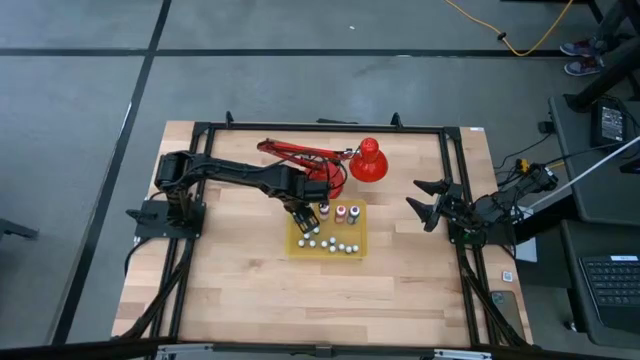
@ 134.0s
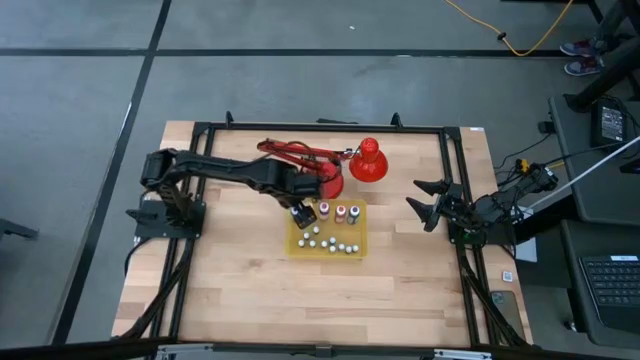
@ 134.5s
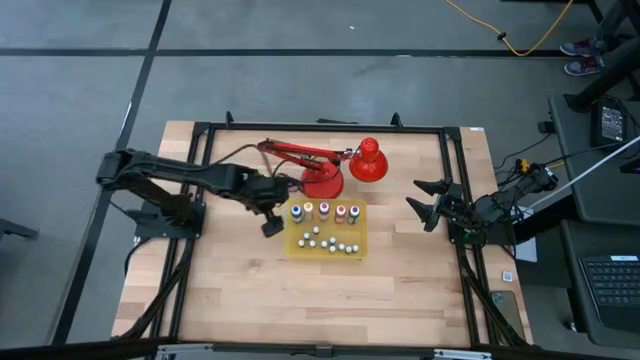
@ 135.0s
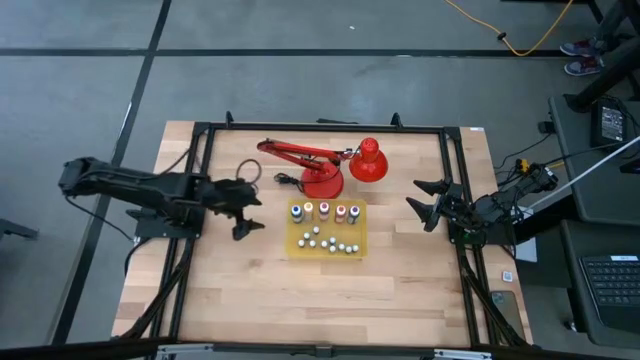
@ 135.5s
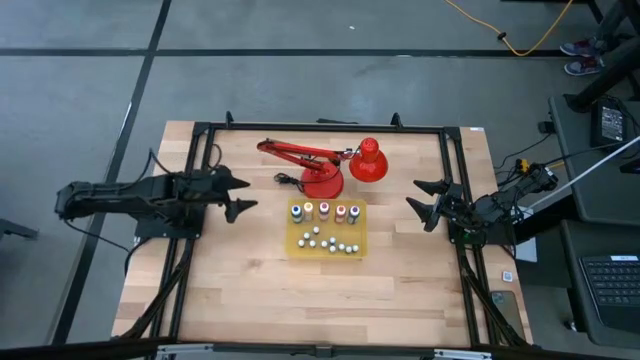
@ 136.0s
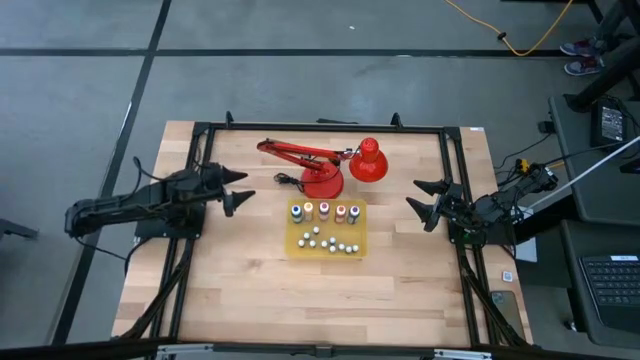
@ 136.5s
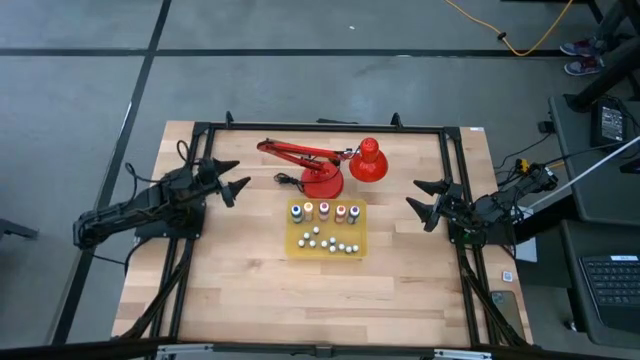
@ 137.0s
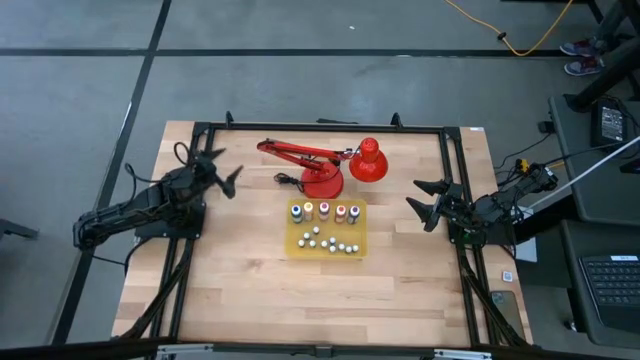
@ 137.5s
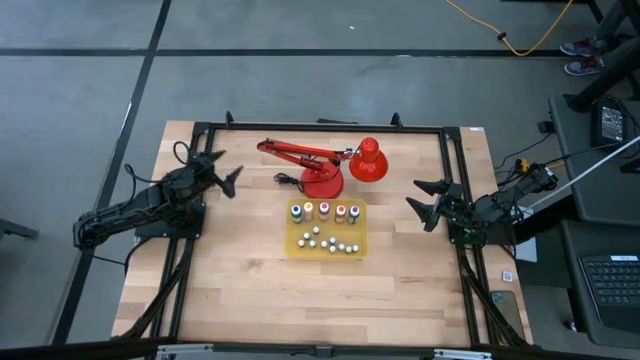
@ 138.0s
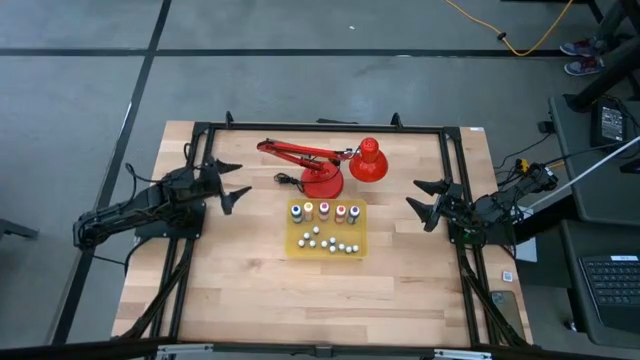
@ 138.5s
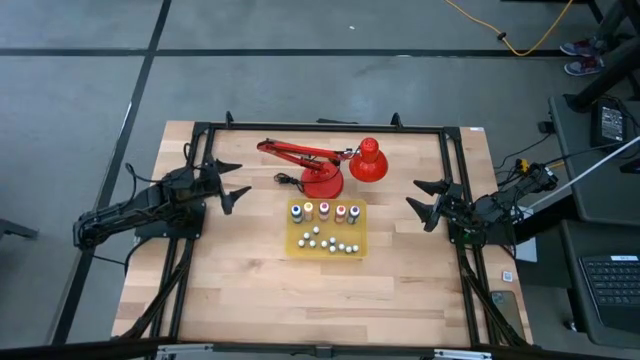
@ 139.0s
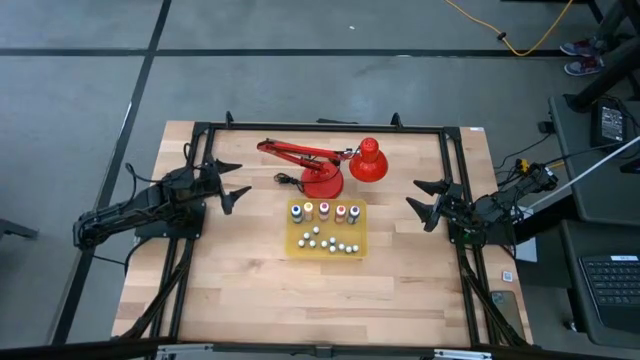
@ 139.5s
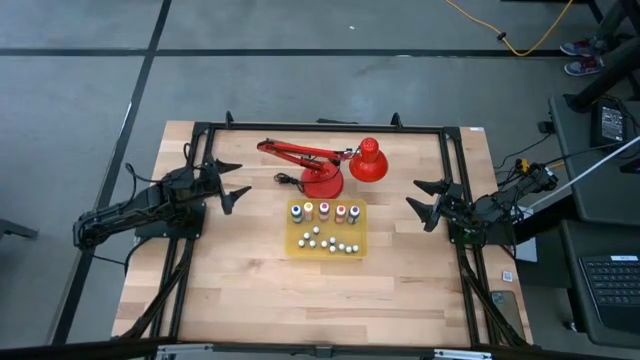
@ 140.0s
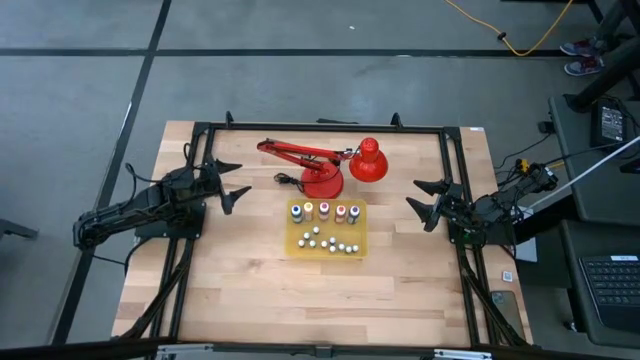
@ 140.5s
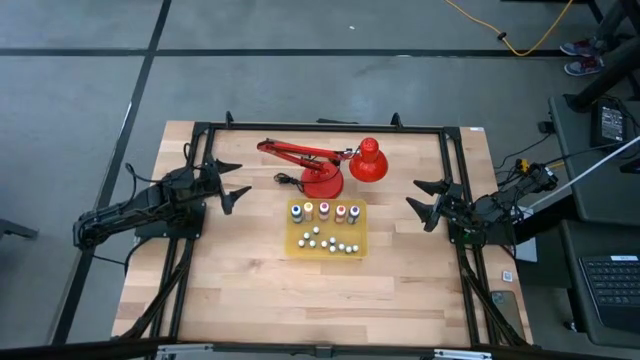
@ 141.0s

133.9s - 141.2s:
Task: Pick & Place food coloring
Return to home position

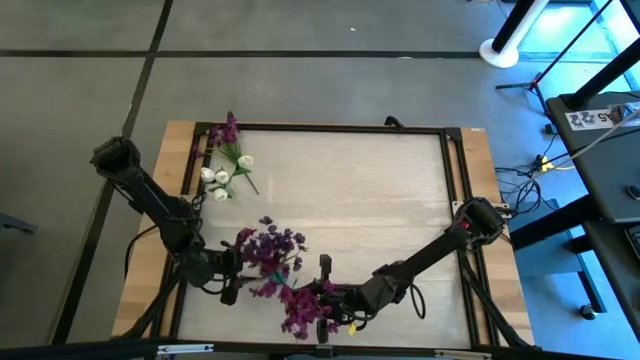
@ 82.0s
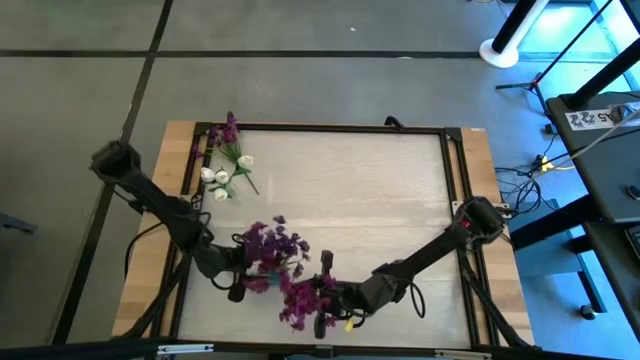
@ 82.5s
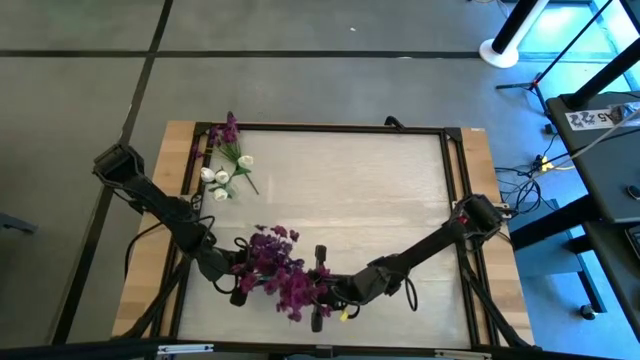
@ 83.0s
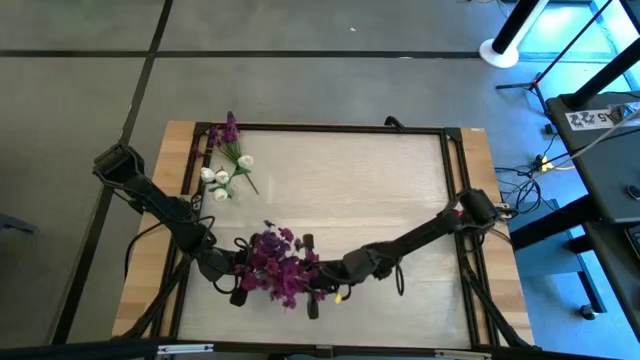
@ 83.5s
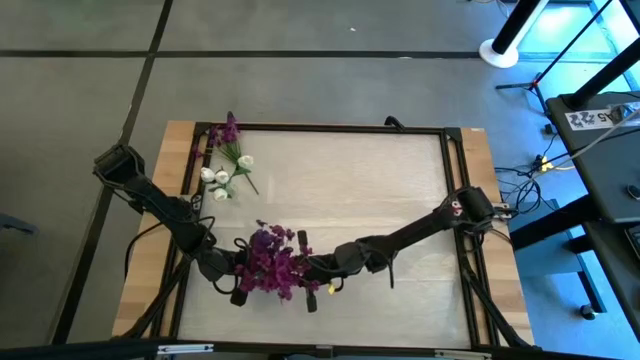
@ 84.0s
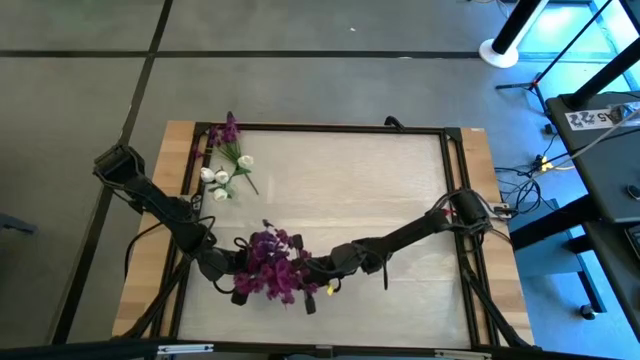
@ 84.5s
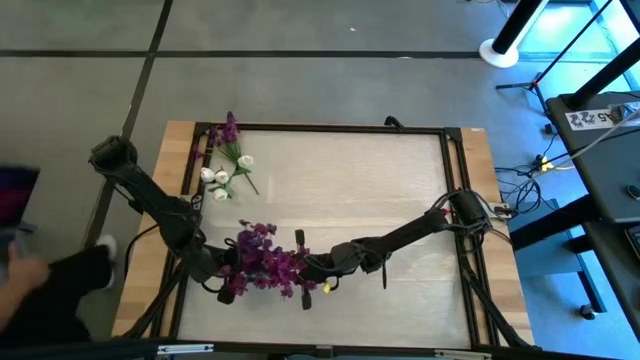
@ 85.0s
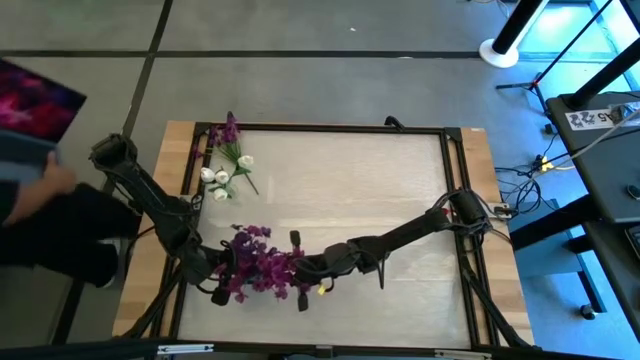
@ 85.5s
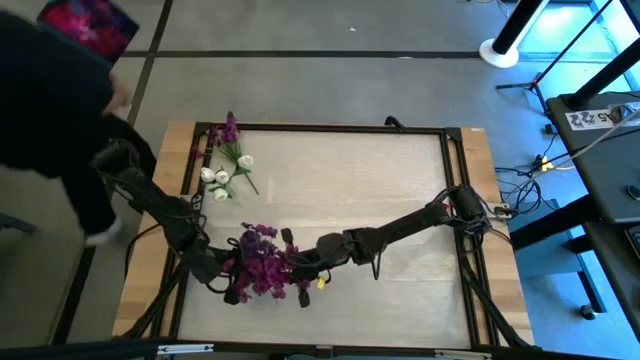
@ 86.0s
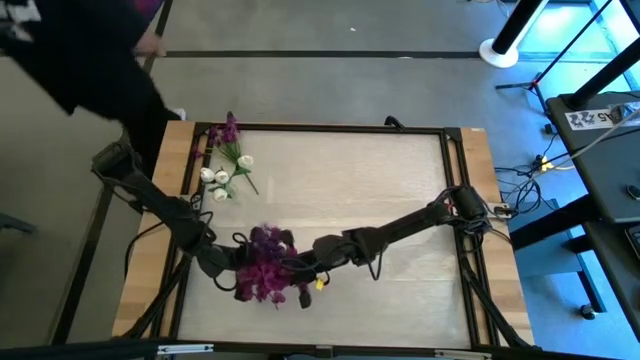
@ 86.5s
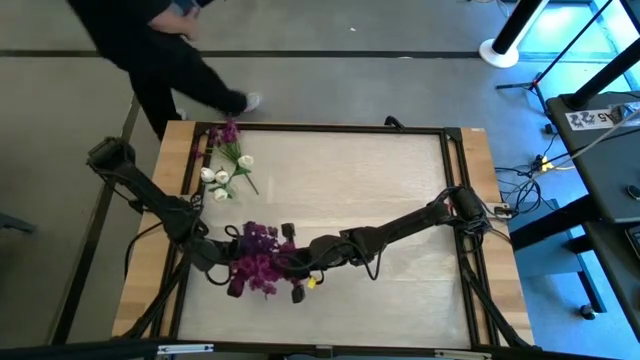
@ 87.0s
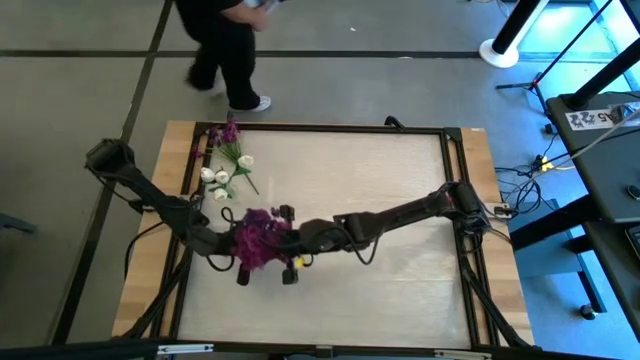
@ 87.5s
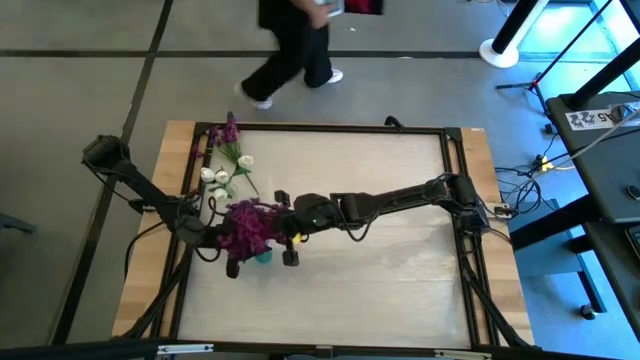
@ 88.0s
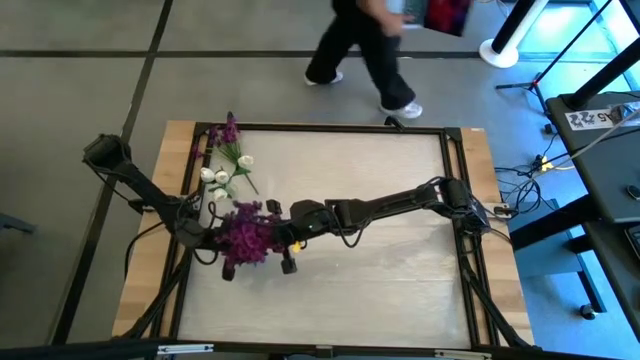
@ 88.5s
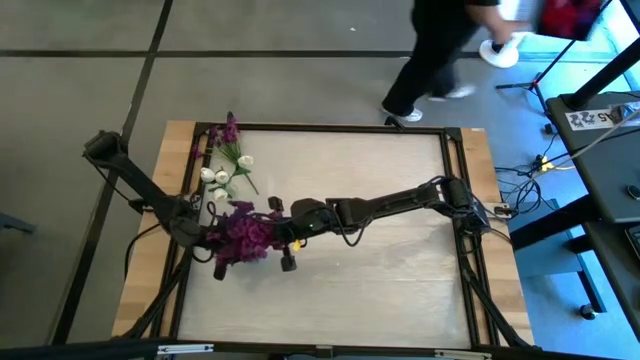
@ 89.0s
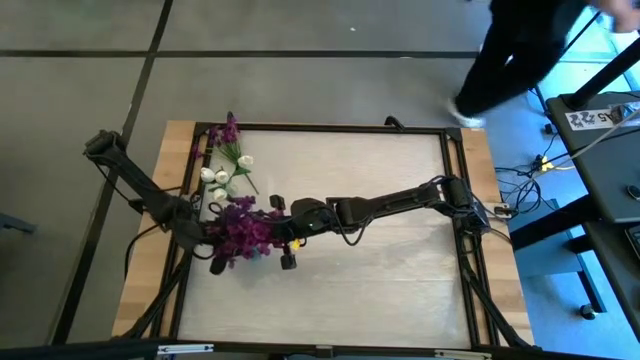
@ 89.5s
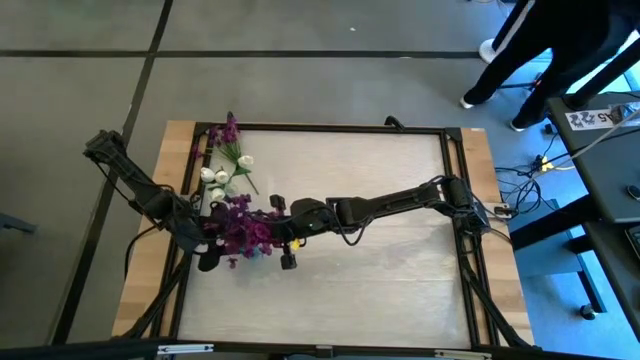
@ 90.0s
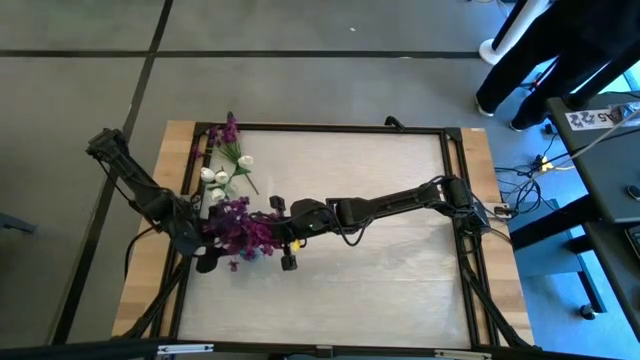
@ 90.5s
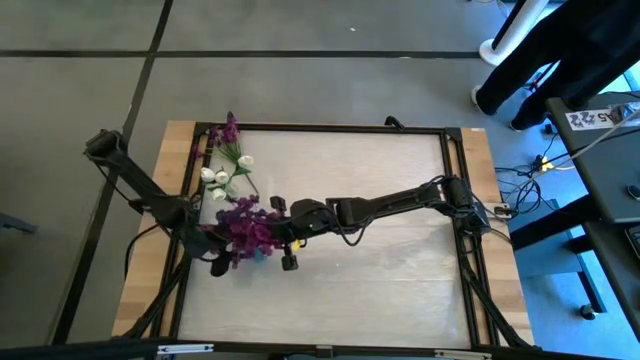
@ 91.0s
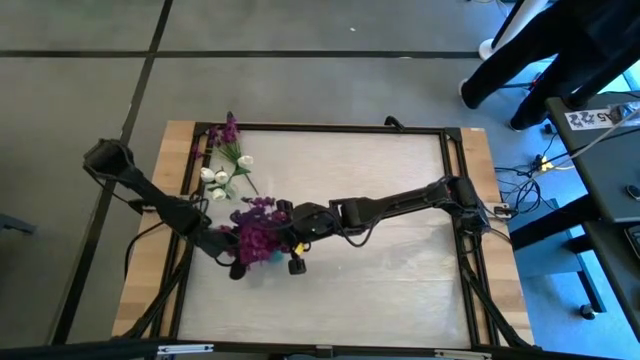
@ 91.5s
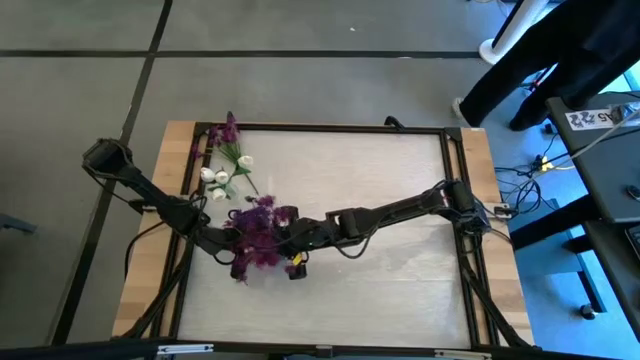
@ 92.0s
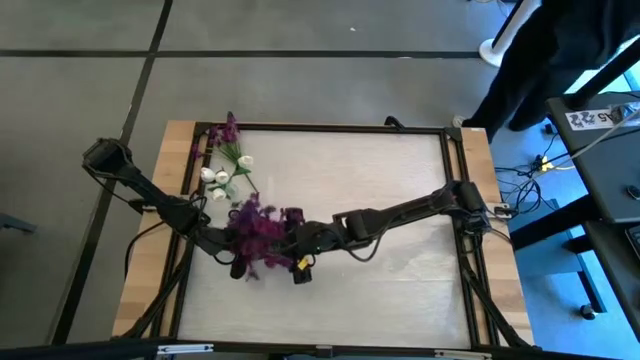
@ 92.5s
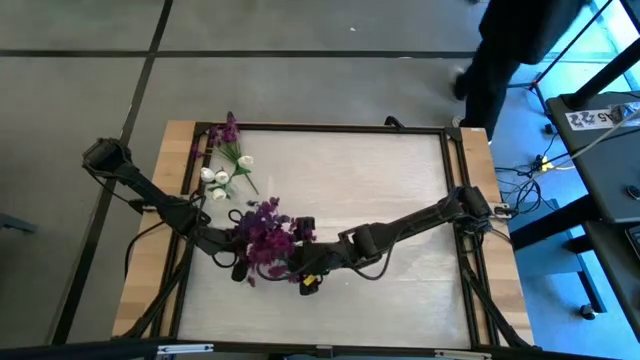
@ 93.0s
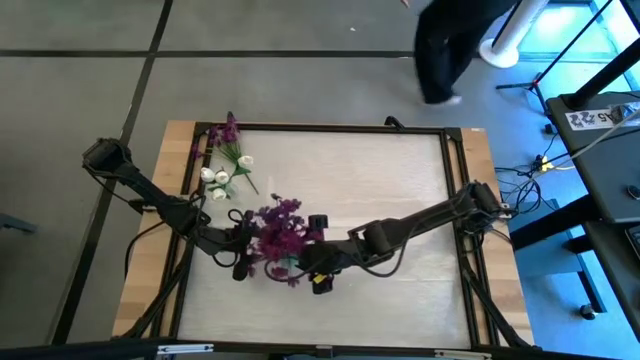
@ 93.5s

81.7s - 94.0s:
Task: Sort flowers into vase by color
Put the violet flower into the transparent blue vase
